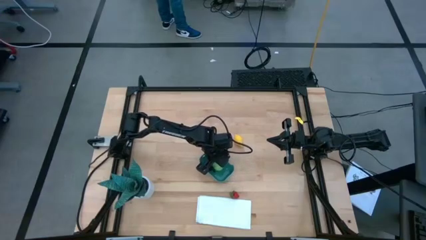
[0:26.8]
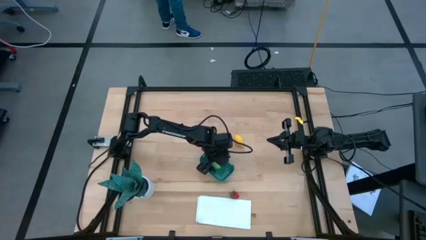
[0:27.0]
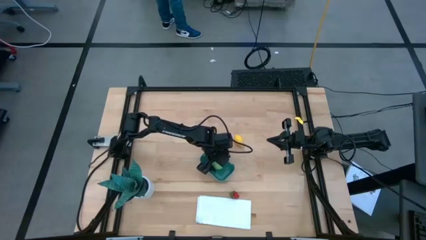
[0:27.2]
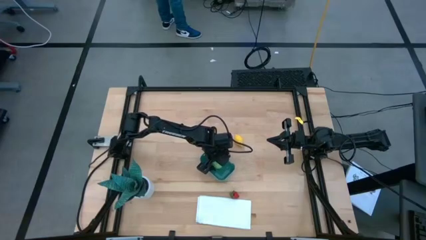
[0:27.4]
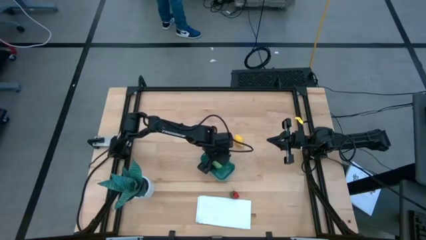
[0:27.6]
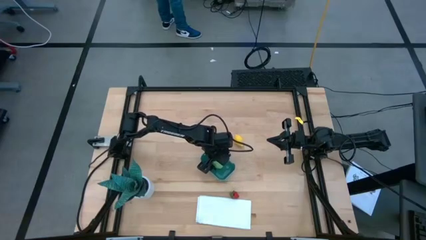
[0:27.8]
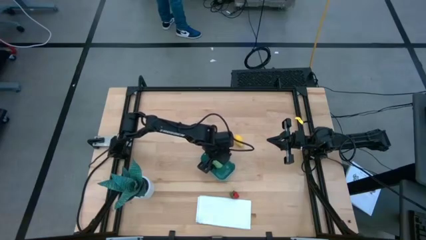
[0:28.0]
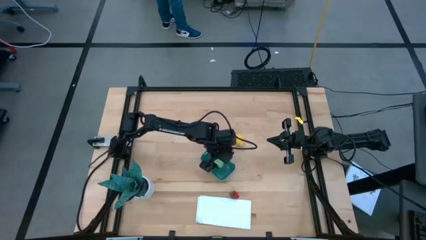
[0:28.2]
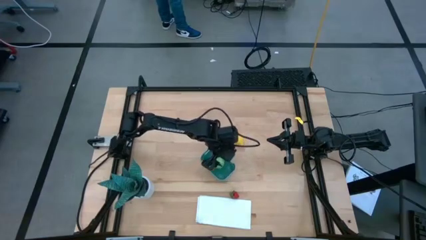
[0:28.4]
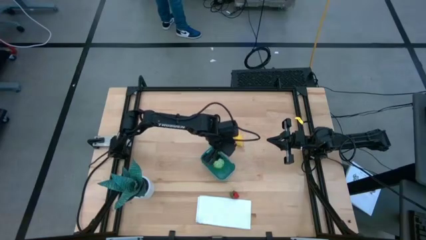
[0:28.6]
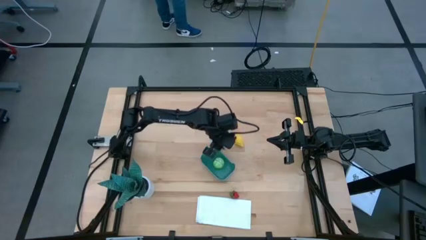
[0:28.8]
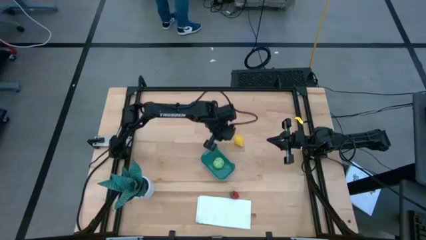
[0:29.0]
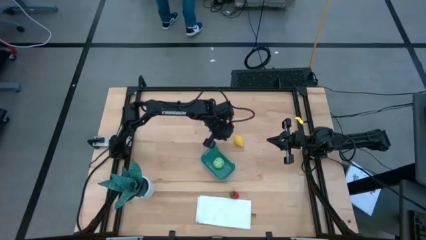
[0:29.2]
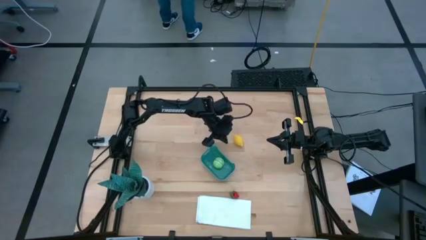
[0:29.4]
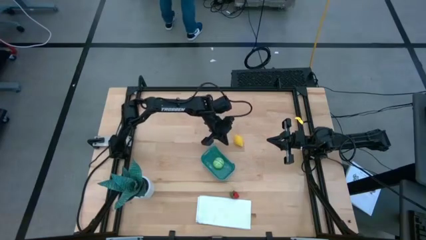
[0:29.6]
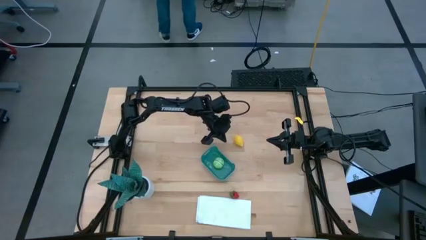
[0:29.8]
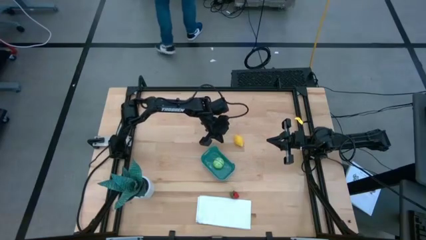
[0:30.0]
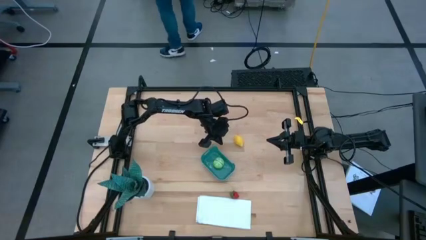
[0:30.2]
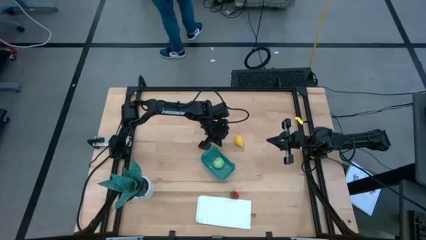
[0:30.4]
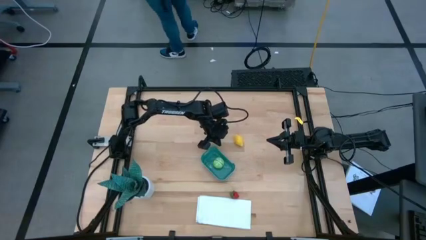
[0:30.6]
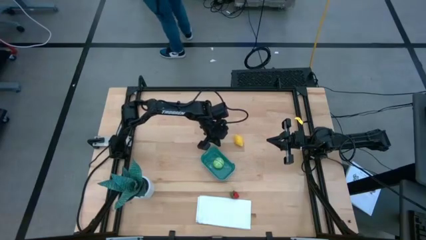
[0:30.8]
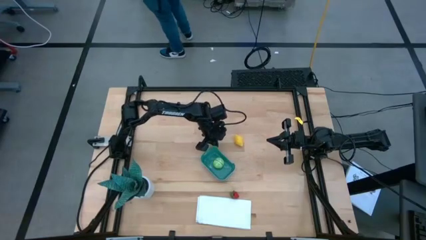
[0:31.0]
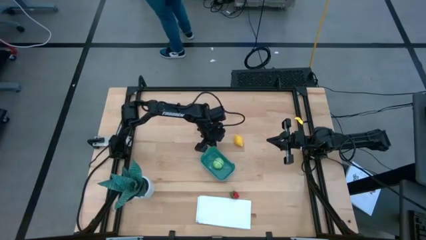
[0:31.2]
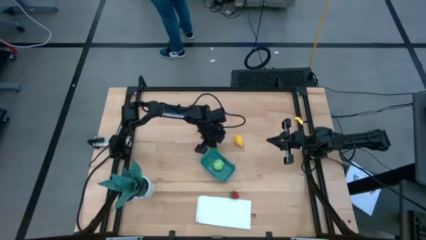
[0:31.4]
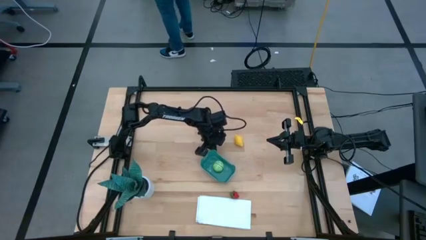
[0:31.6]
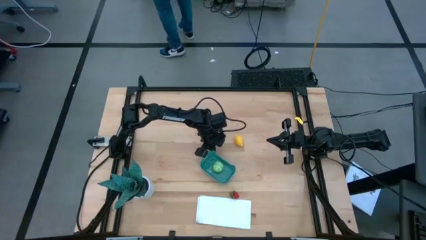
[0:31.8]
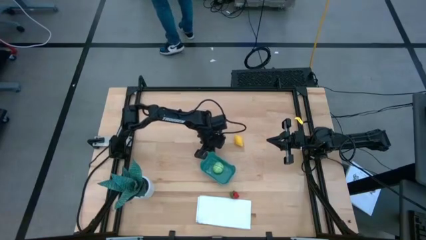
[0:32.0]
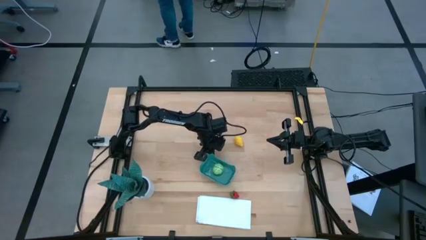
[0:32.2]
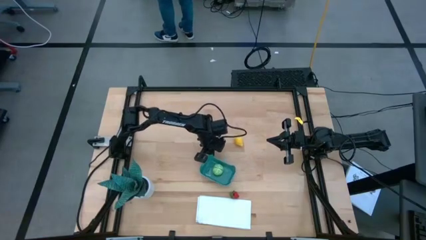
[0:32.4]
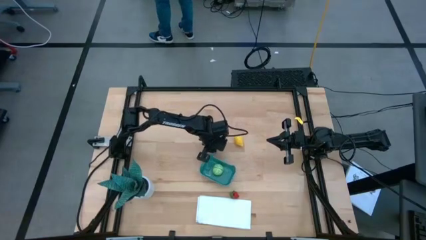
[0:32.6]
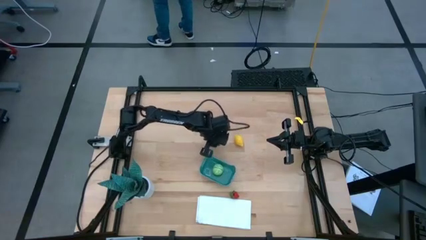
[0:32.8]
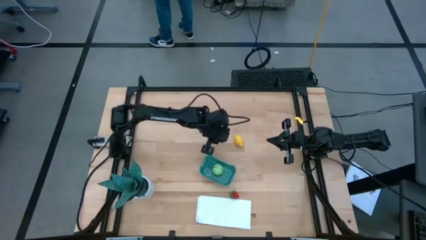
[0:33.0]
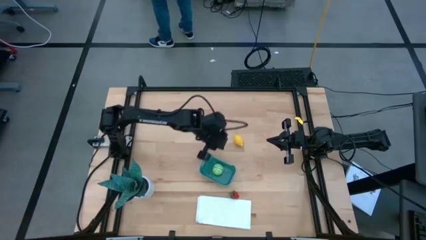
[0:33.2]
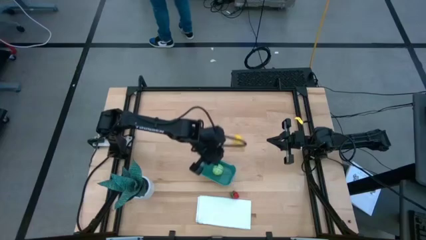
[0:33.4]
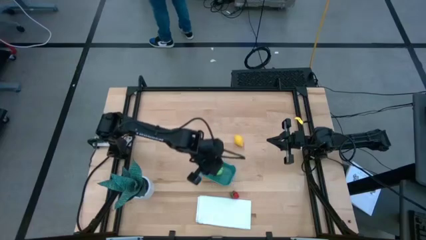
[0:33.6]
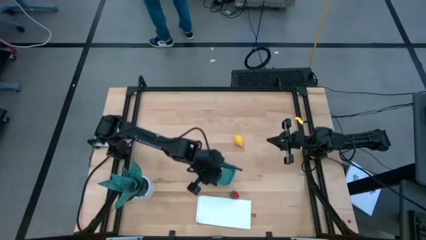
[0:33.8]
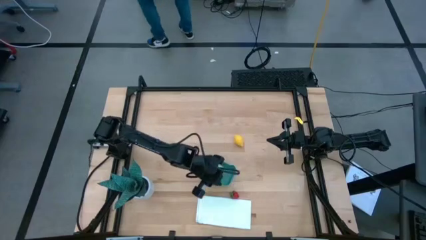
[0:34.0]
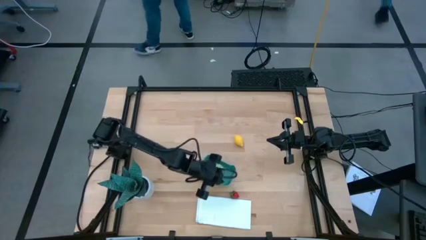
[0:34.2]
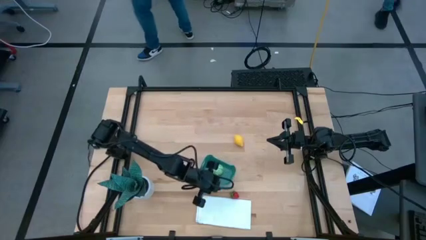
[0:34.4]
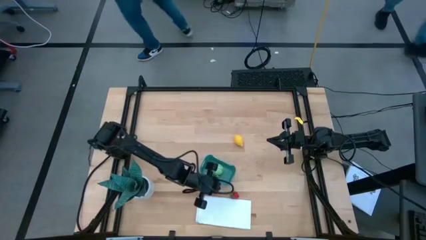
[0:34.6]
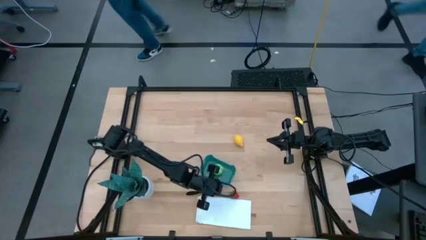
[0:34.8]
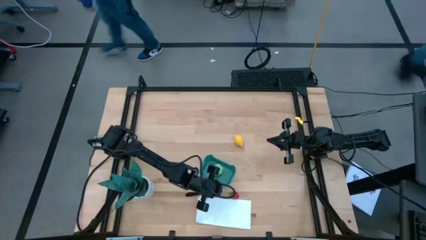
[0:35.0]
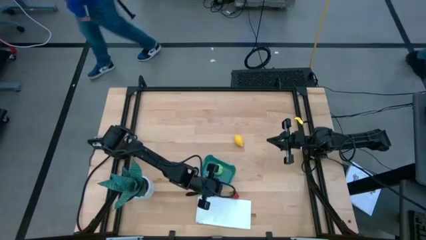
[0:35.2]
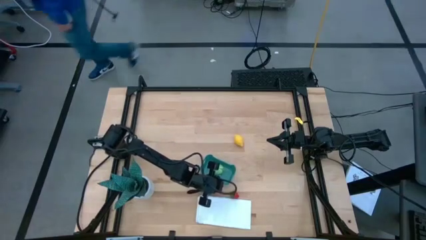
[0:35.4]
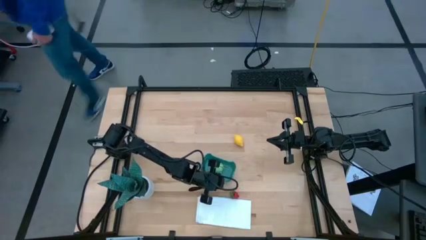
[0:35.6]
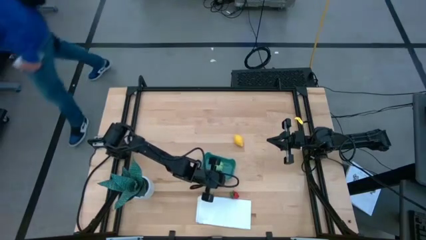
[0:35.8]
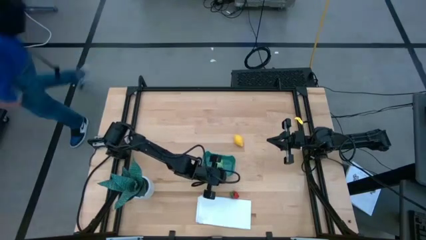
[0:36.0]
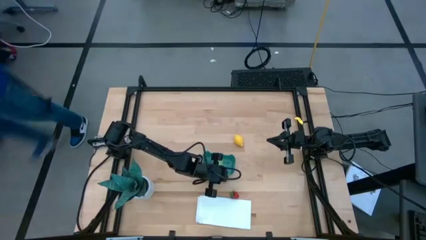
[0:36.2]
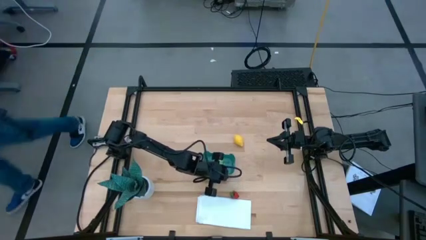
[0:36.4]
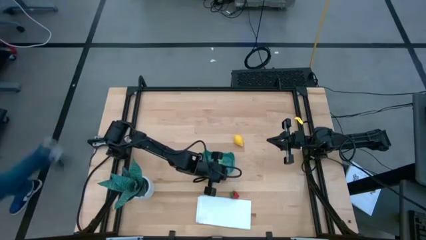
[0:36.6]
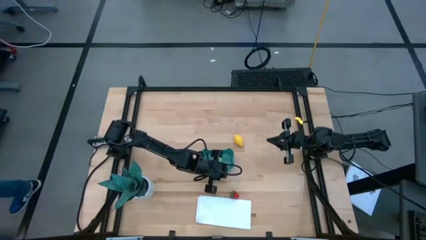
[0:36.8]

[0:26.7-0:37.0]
Task: Pick and placing Produce into tupperware
Adjust the green bin

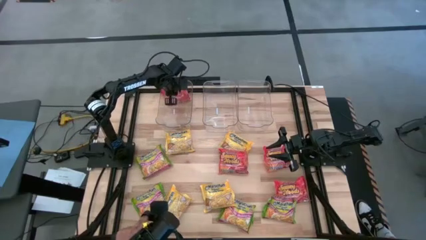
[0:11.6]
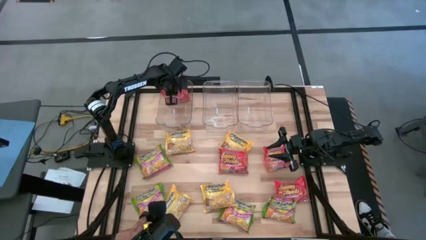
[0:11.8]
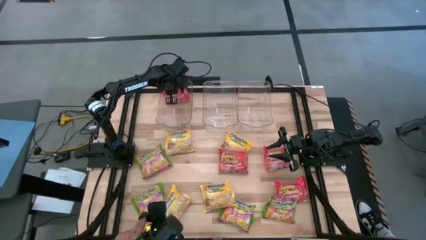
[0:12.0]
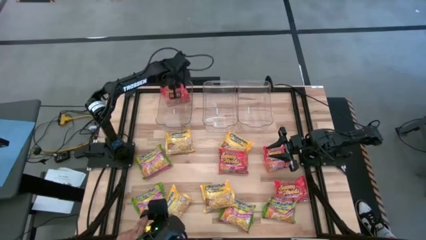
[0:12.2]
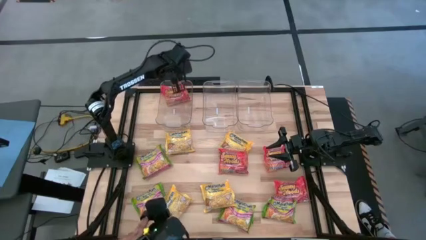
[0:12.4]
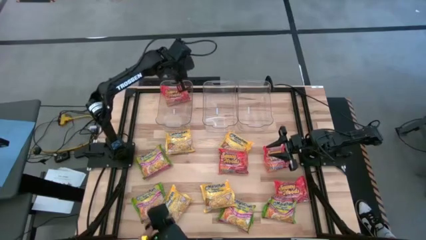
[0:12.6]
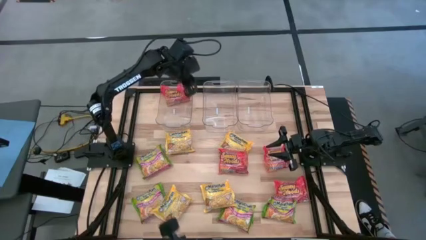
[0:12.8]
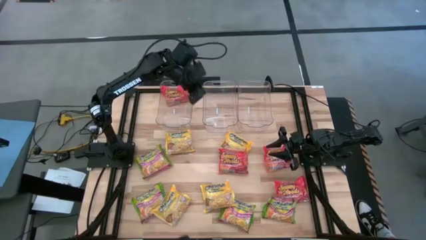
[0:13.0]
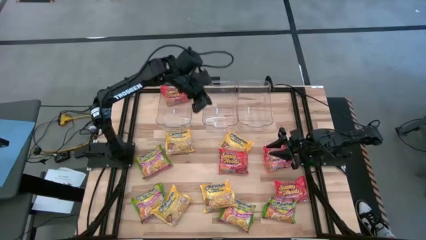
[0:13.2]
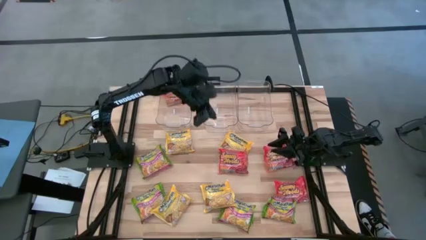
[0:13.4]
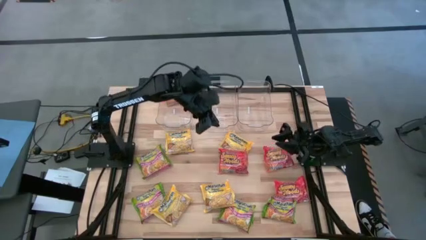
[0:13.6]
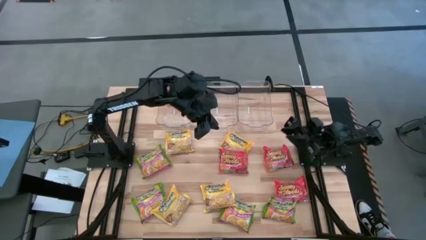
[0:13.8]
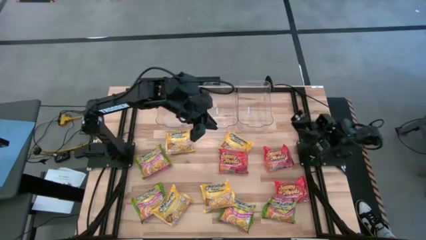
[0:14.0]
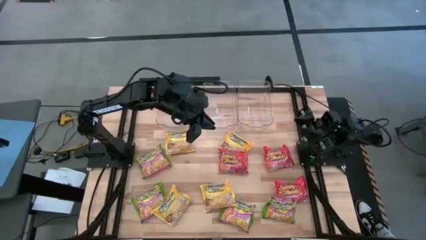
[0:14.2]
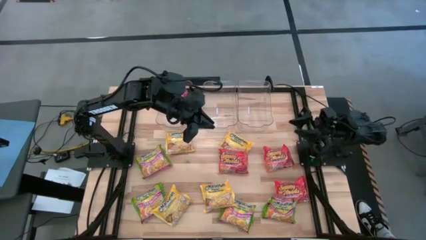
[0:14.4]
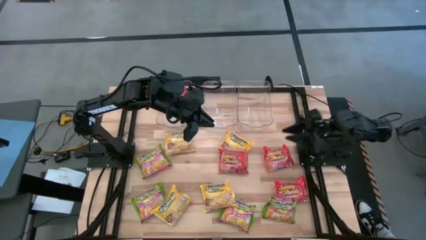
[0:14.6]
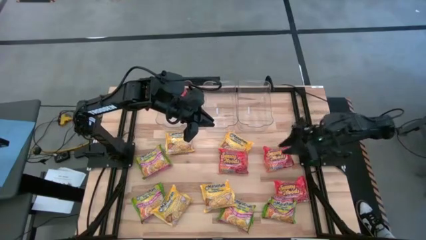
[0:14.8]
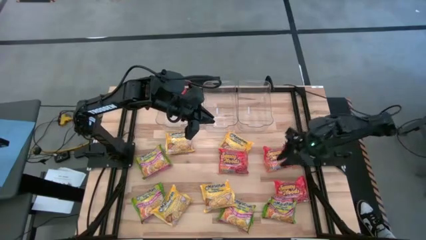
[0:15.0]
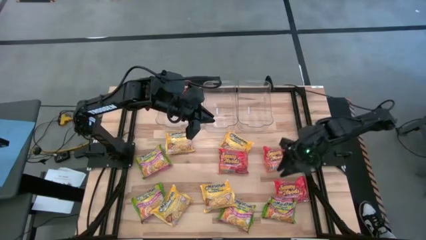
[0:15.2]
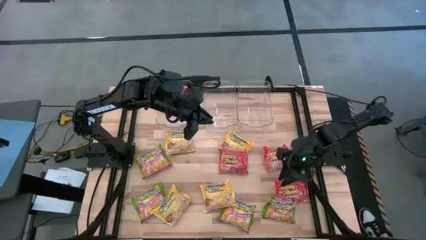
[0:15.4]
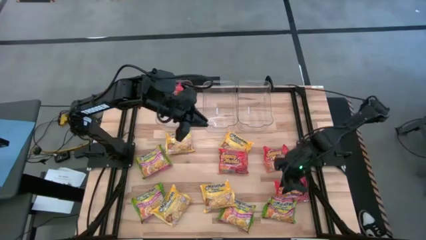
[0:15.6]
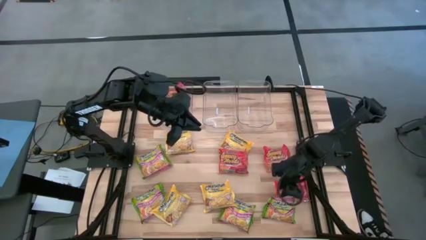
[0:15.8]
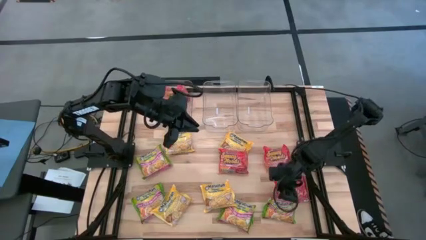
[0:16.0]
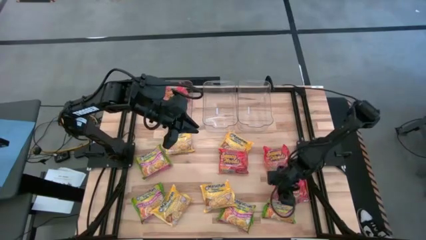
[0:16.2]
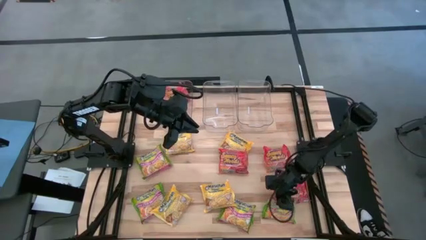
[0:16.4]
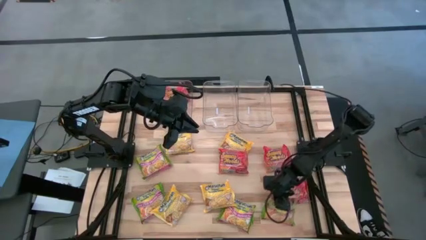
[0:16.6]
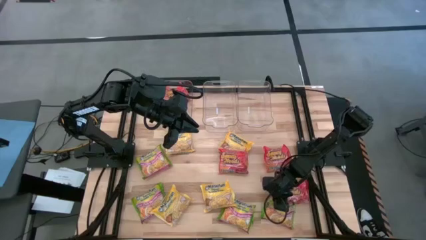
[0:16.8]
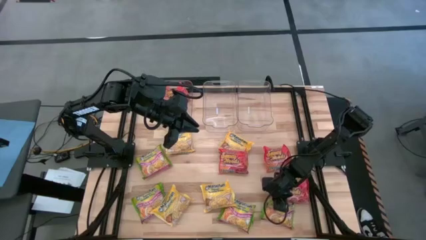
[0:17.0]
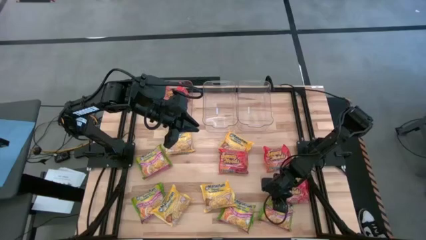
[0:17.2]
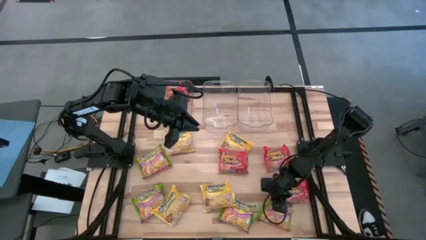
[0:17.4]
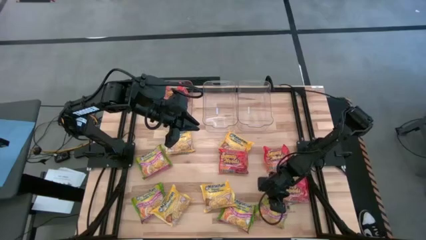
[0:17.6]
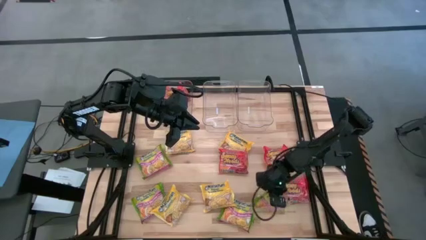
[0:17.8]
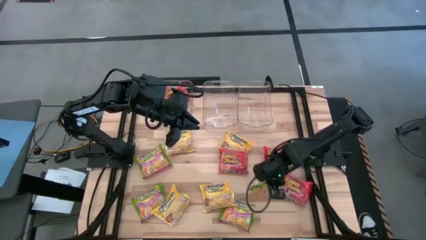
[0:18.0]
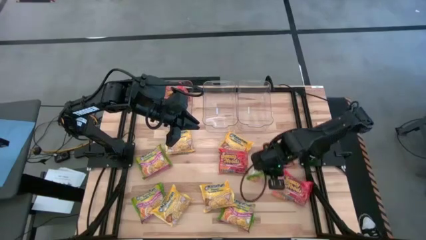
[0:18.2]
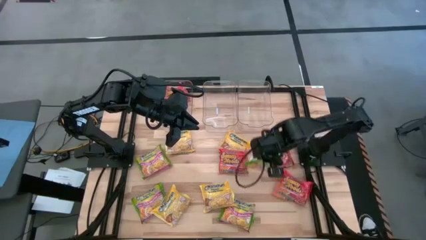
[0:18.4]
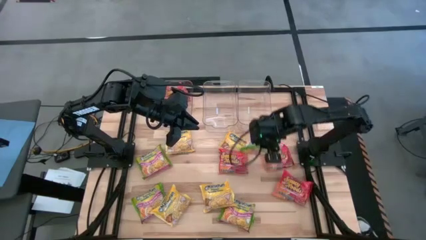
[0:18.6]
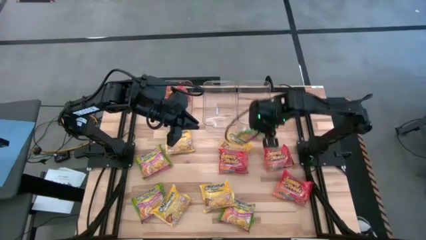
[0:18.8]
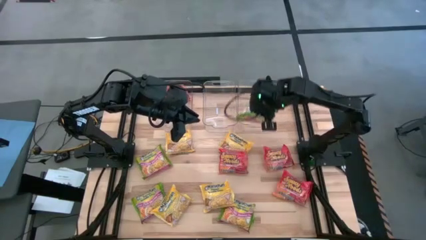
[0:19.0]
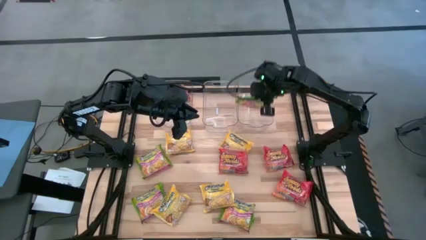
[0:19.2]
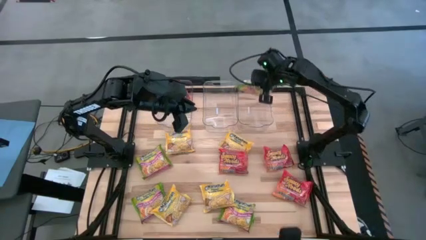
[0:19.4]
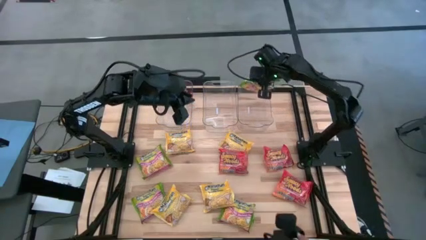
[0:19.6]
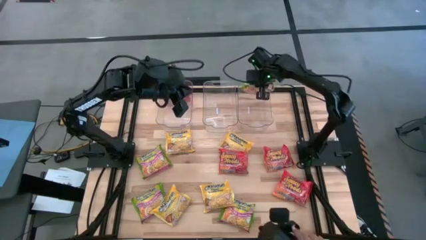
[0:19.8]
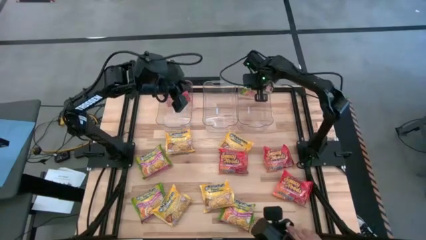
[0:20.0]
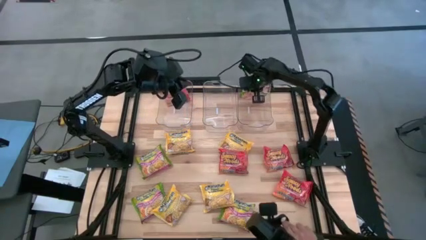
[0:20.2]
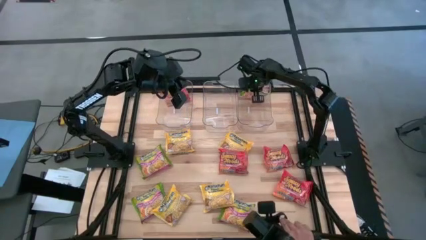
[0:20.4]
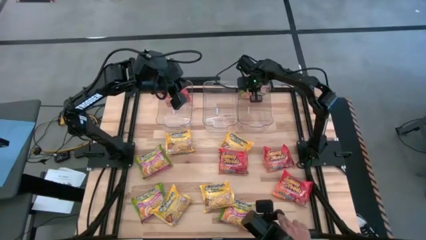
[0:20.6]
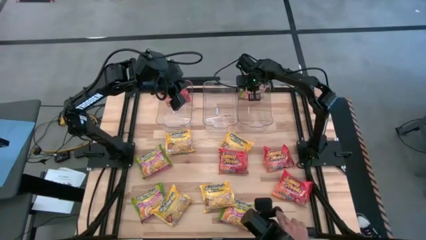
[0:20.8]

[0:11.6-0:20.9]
Task: Sort Maruchan noodles
Put the green noodle pack into the right transparent bin
